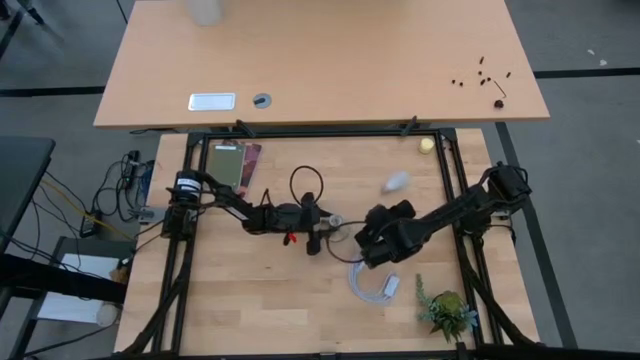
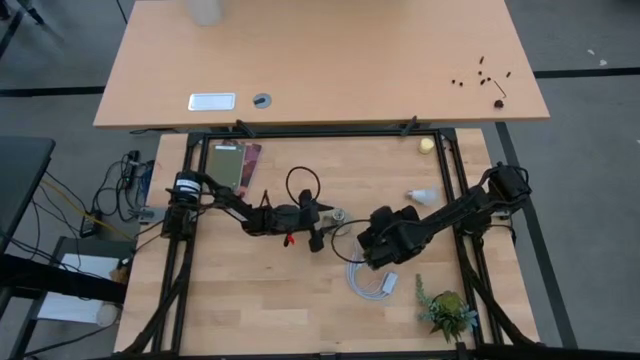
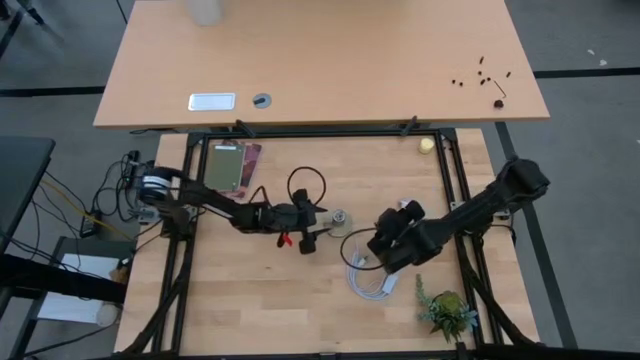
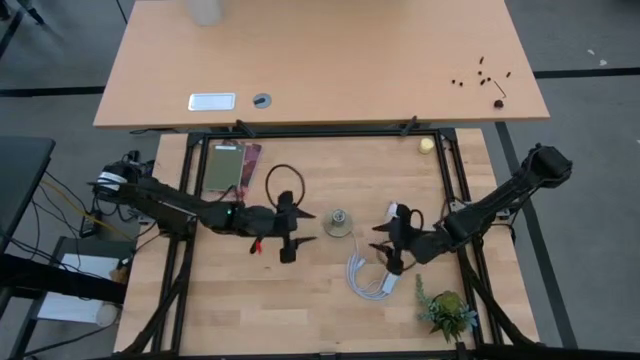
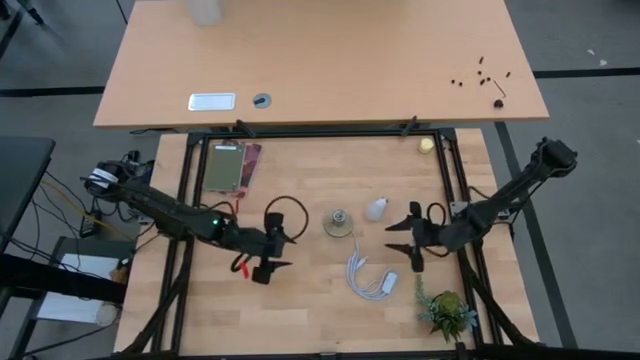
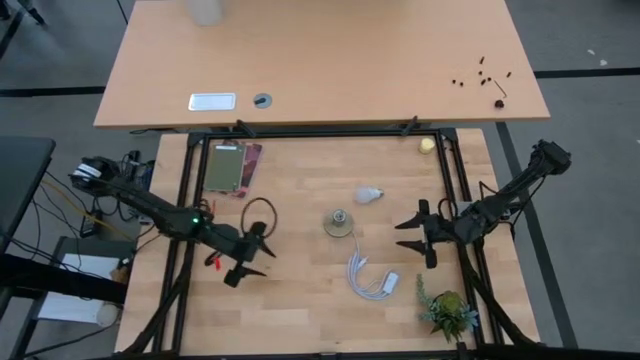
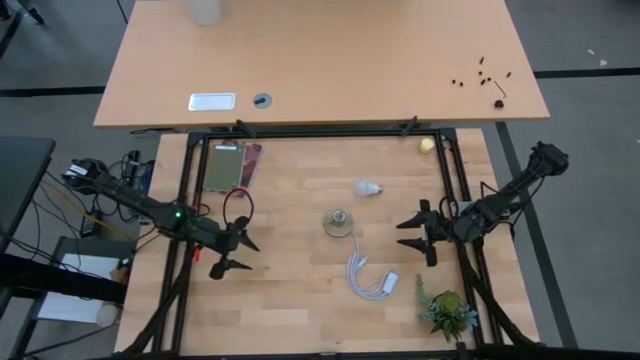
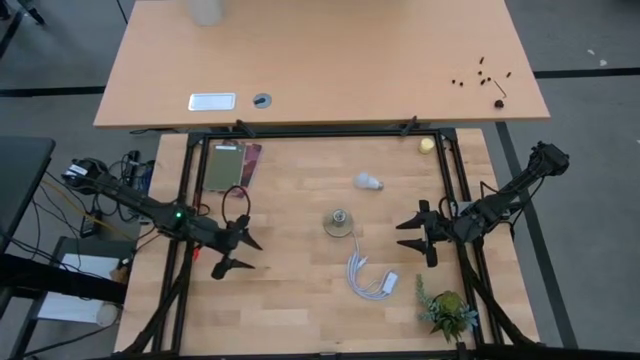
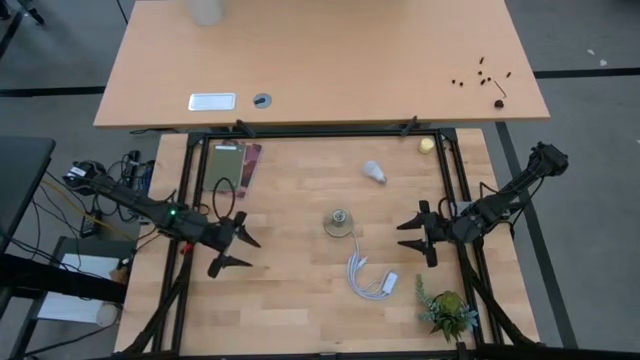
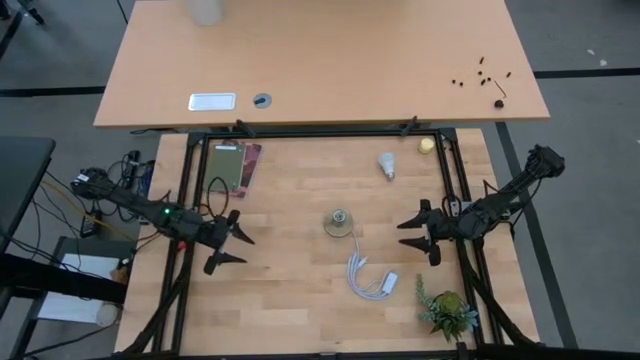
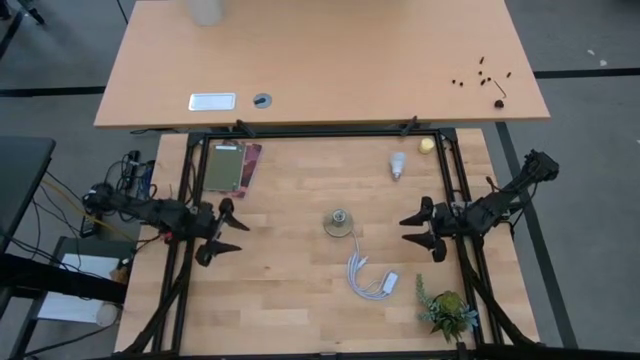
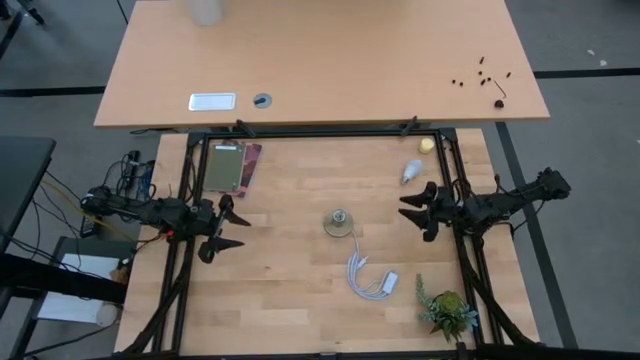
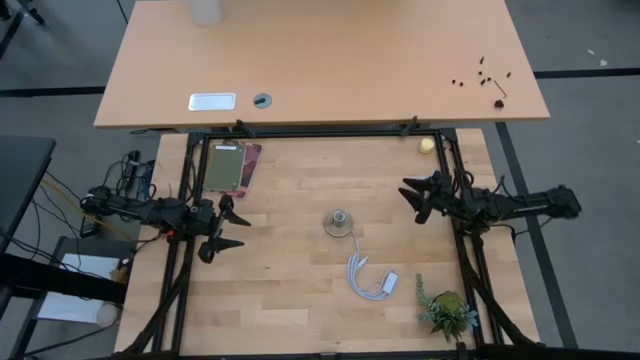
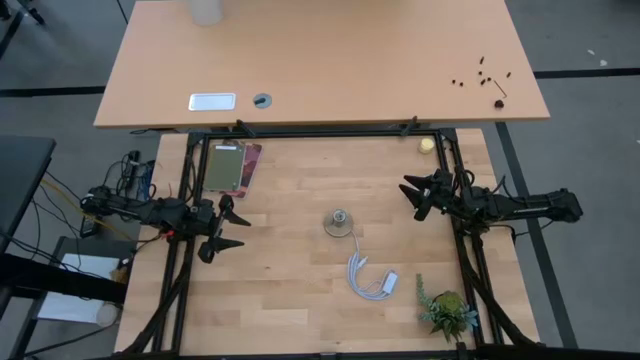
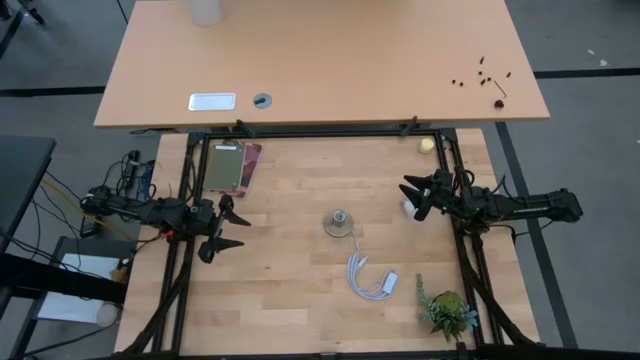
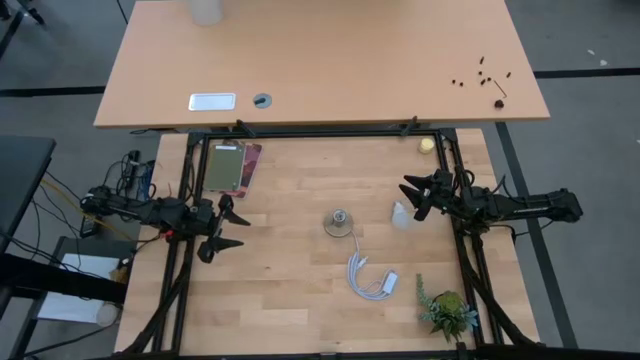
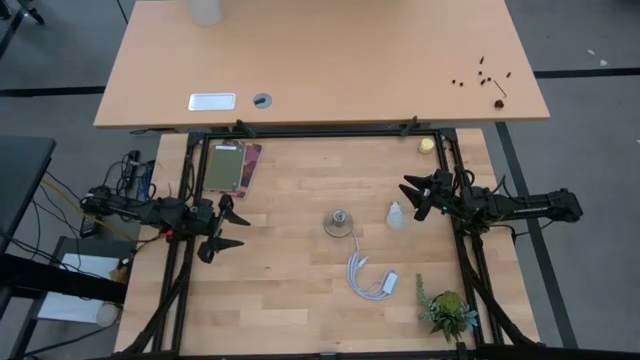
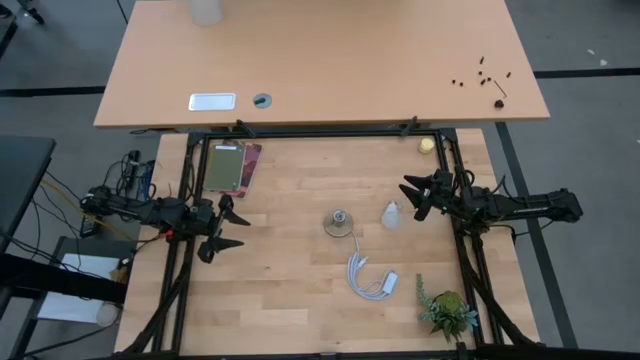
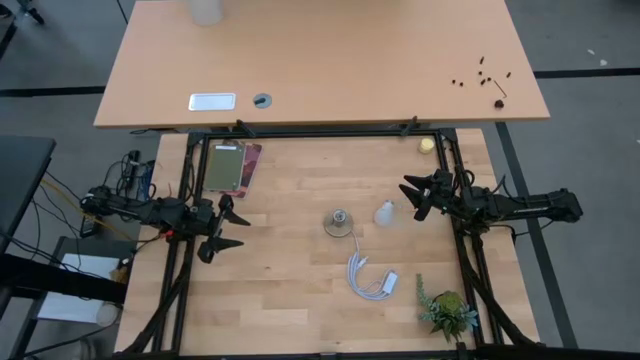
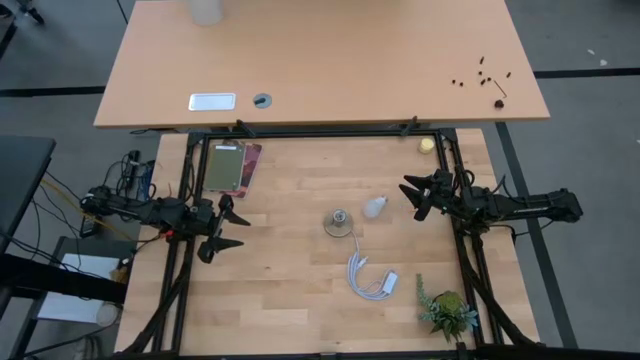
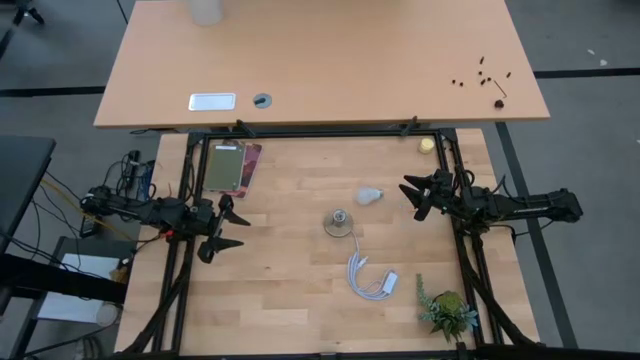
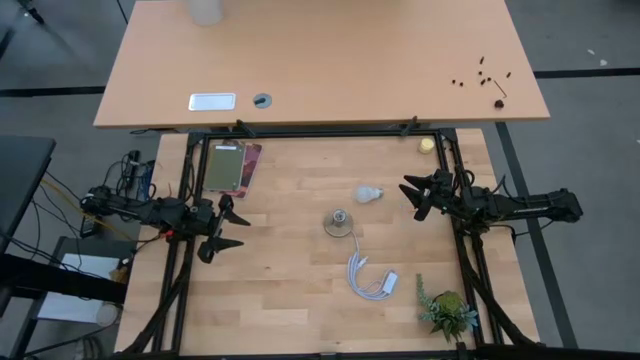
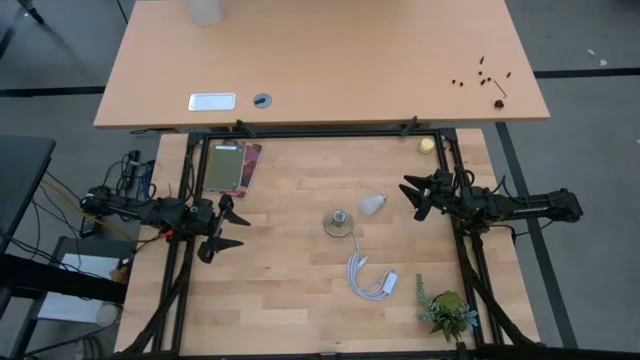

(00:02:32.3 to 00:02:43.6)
Task: Screw lightbulb
Return to Home Position

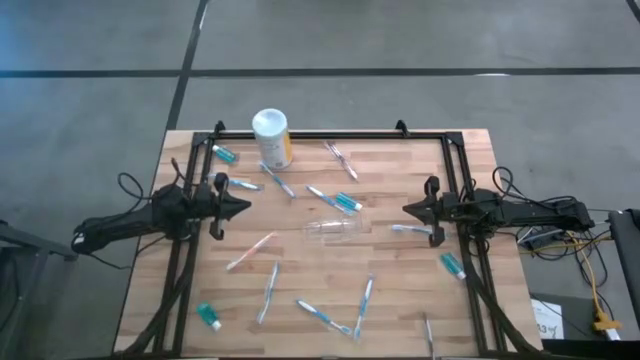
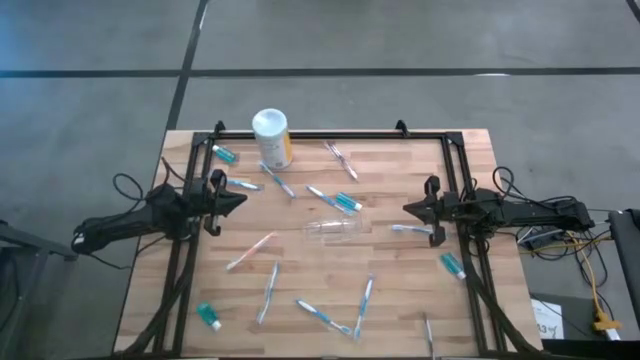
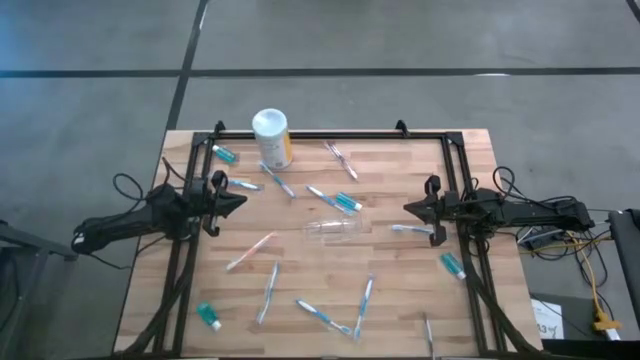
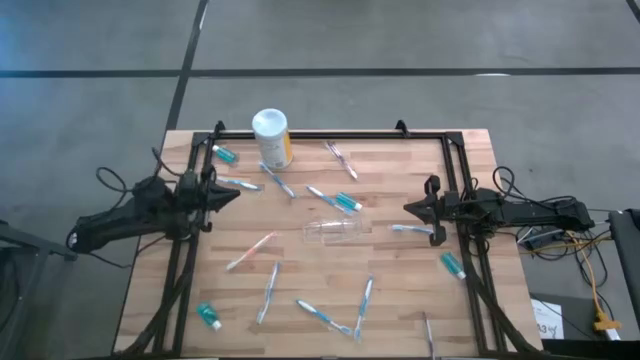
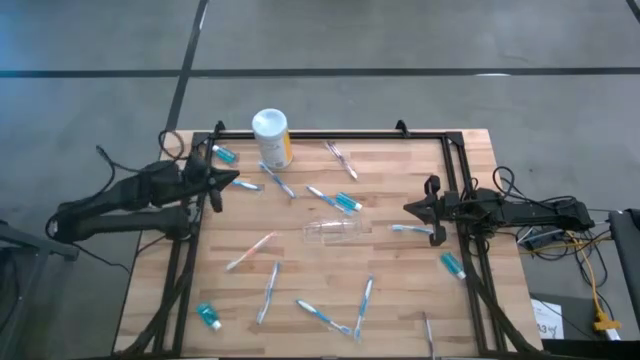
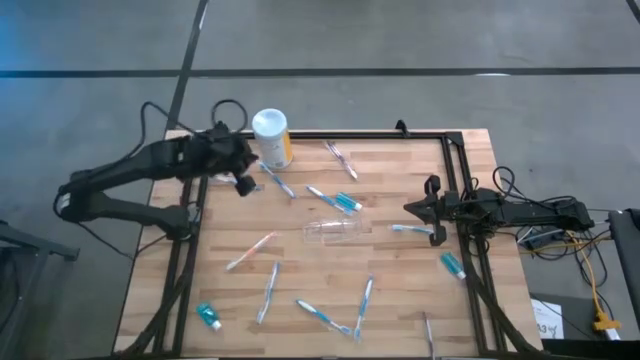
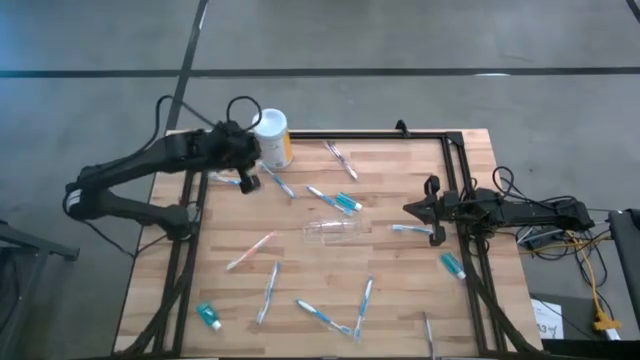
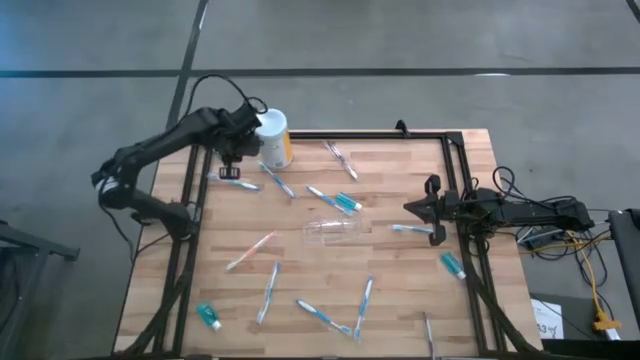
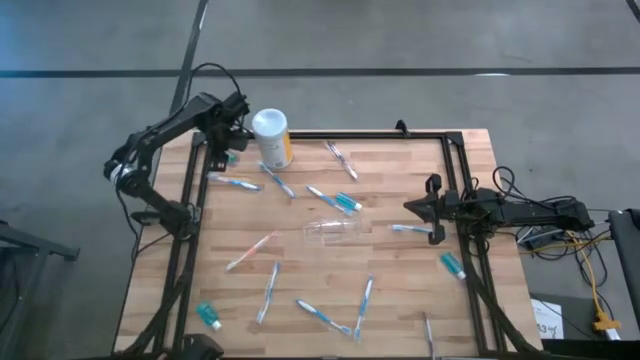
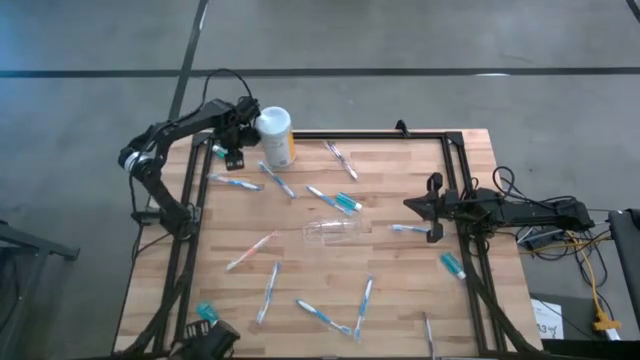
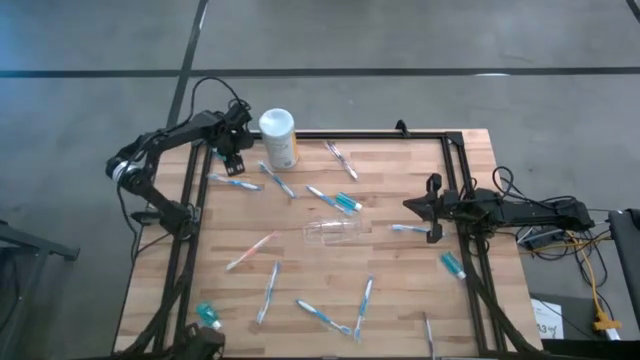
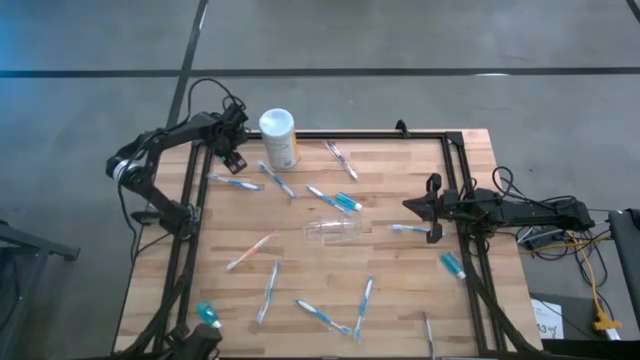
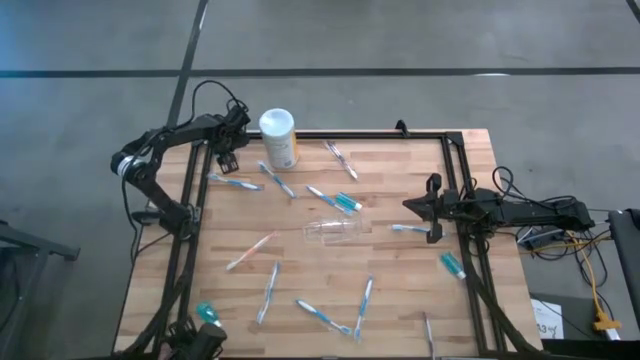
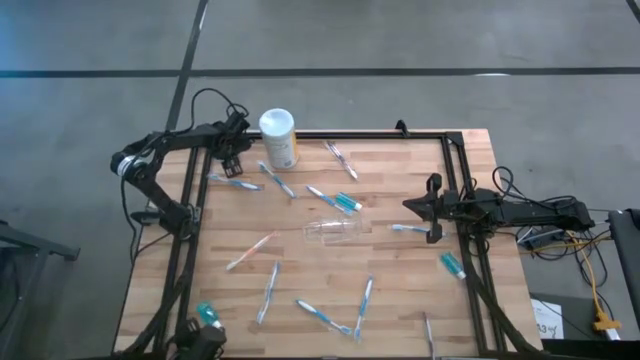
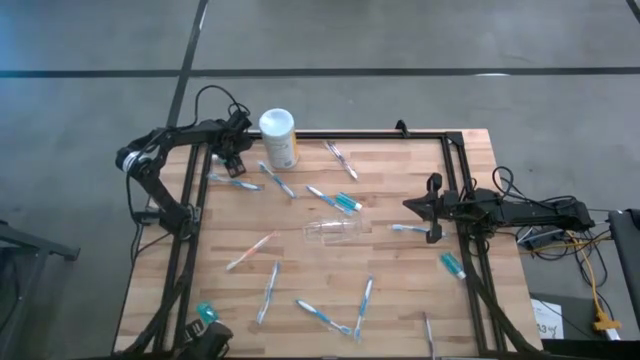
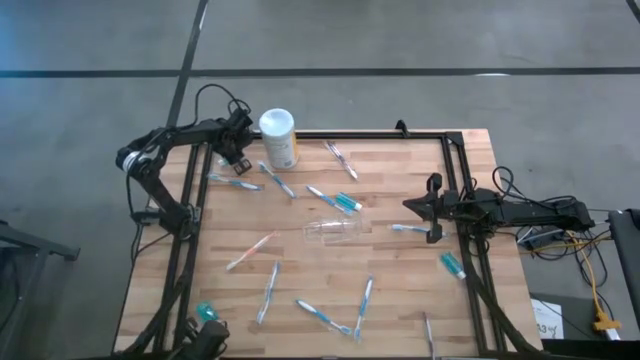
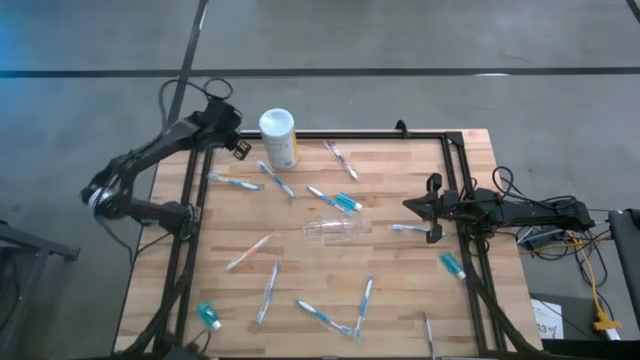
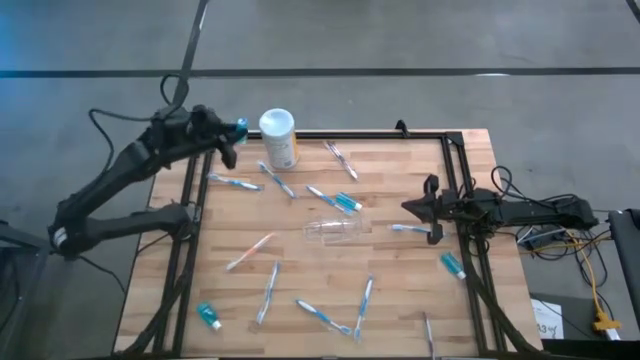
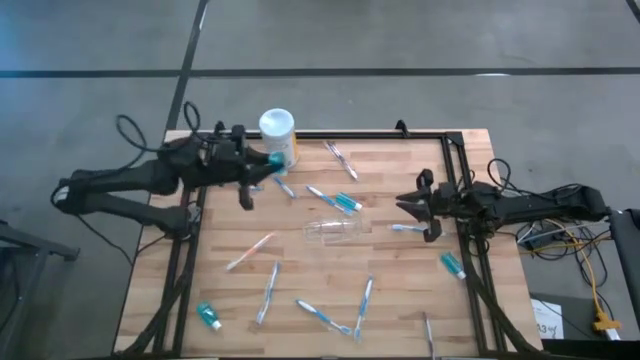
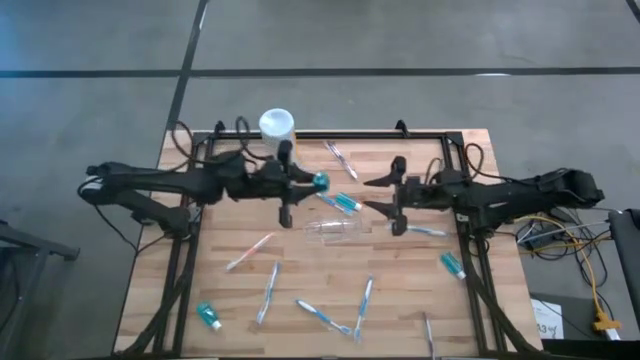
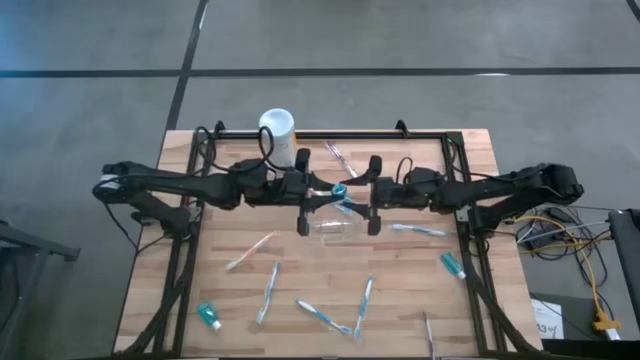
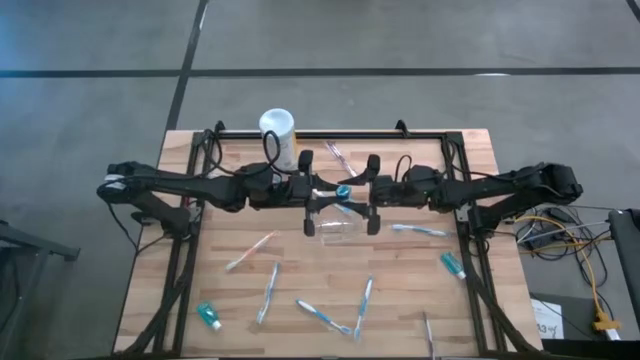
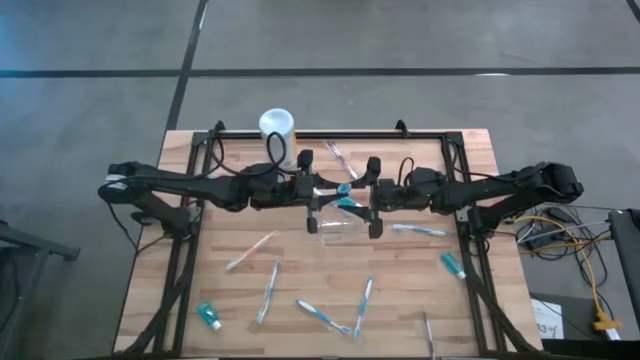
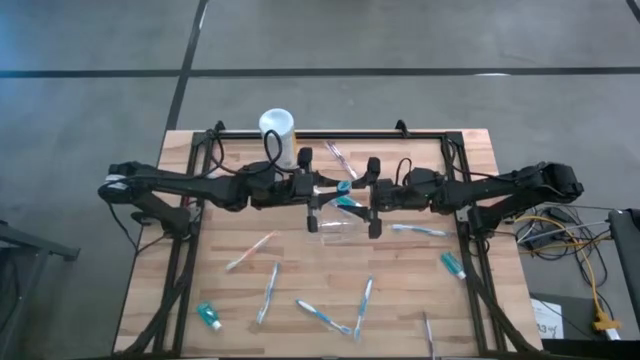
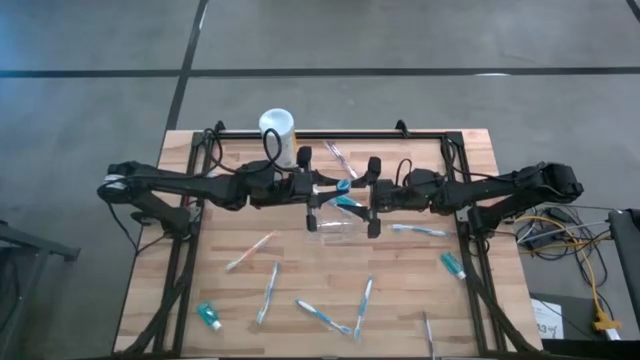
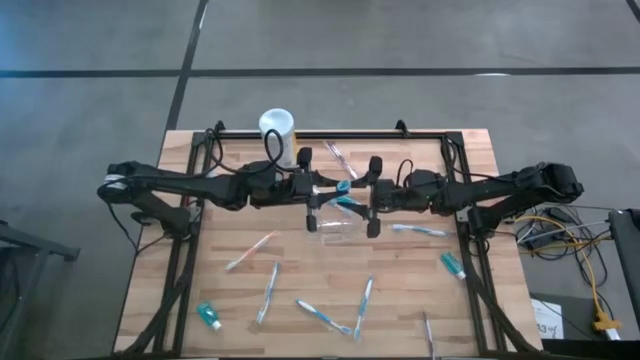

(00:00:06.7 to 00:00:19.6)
Task: Pick & Place toothbrushing station
Put the blue mouthwash into the transparent organizer
